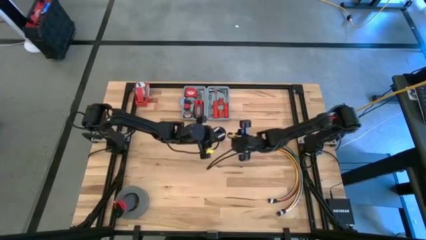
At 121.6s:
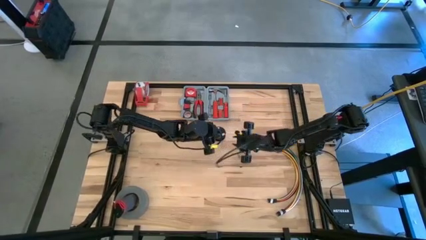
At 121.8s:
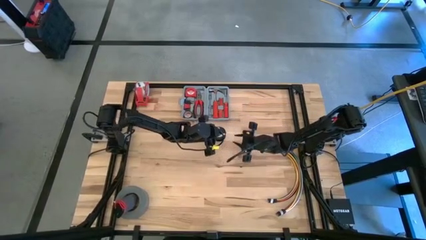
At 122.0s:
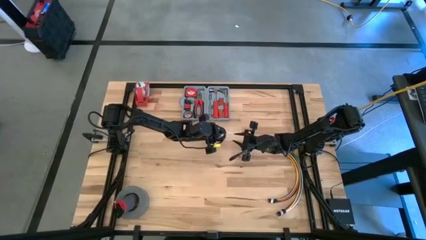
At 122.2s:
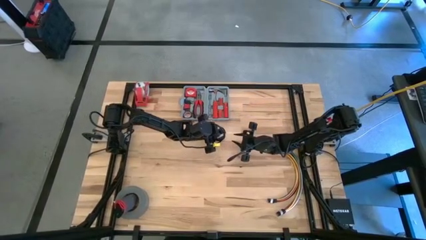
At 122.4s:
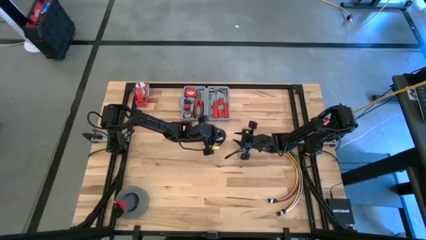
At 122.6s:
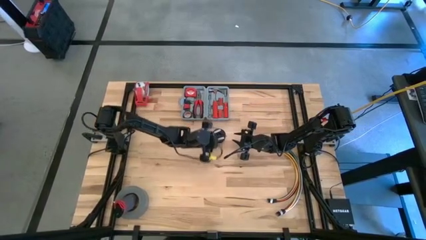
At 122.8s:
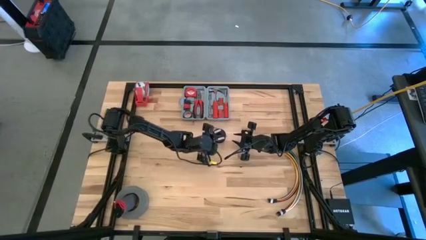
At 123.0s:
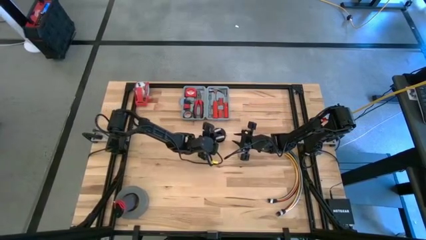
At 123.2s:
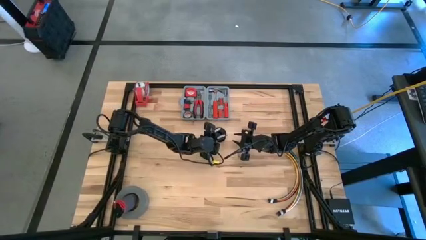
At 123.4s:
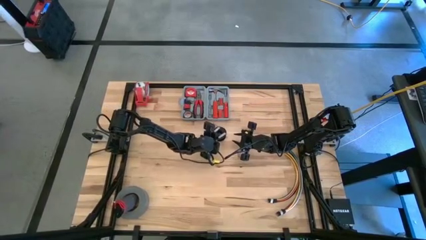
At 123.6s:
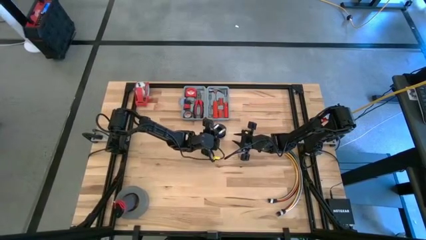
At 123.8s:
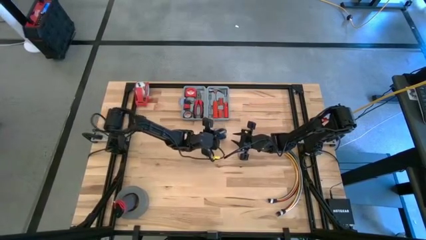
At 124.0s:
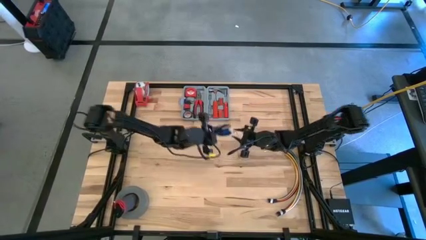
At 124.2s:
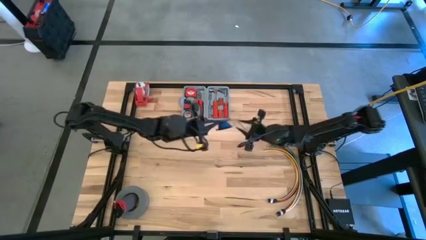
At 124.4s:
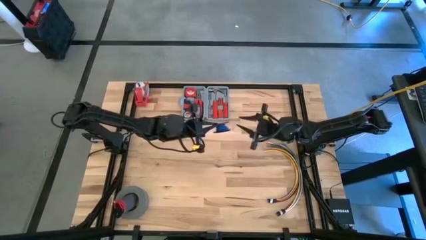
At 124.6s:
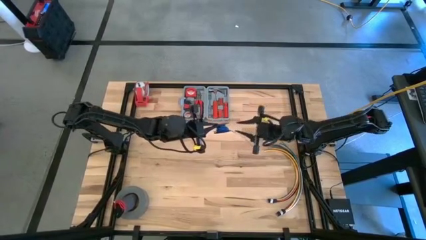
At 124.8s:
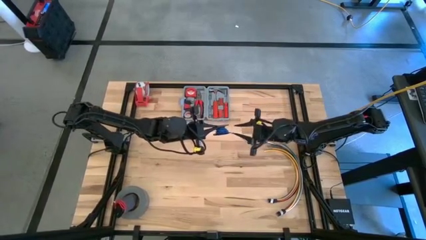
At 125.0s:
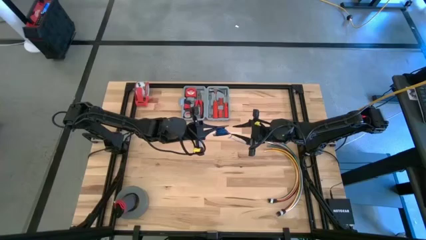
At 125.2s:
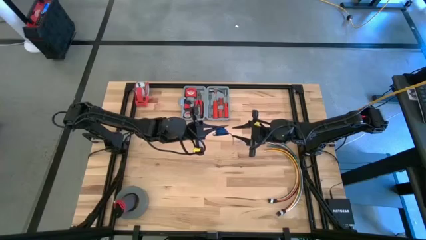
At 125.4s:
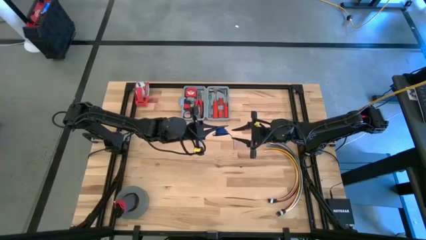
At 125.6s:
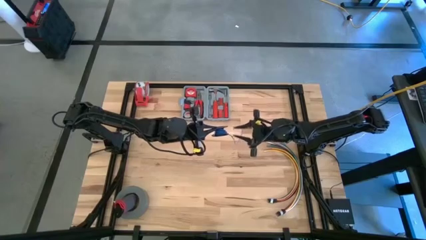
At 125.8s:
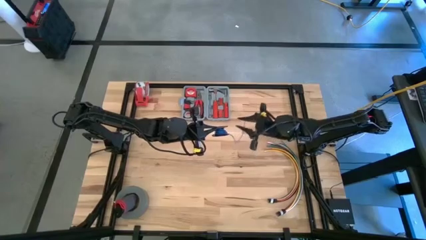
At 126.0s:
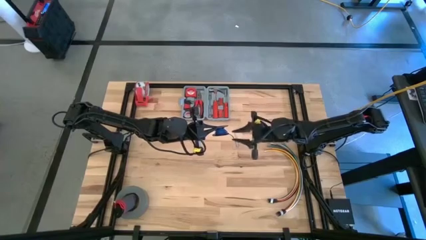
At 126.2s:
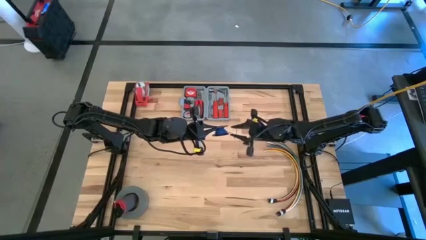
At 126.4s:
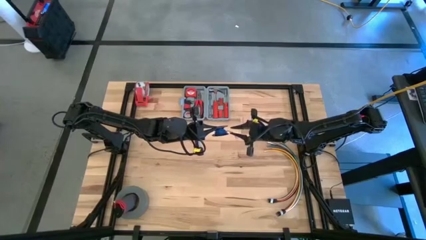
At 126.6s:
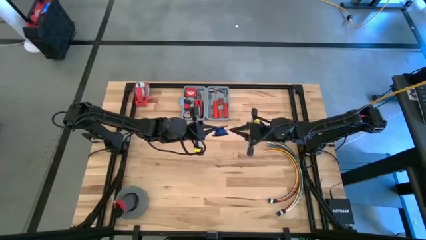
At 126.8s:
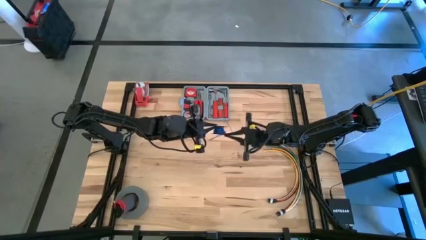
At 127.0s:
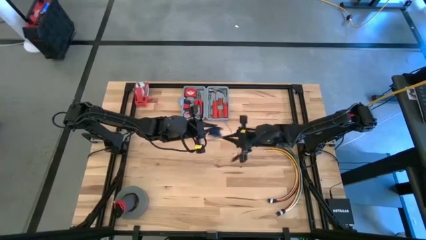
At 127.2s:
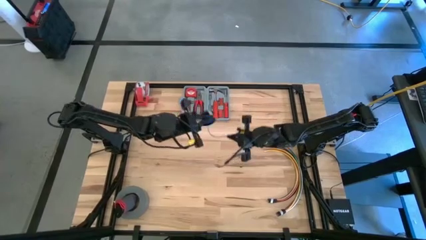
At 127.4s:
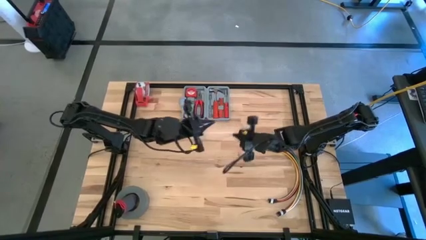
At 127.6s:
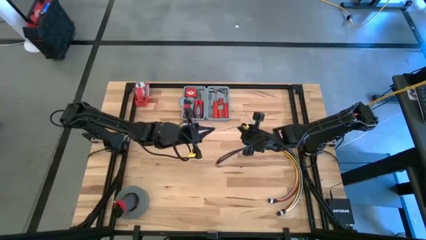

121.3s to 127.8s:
Task: Coil cords
Uncoil the blue wire from the spool

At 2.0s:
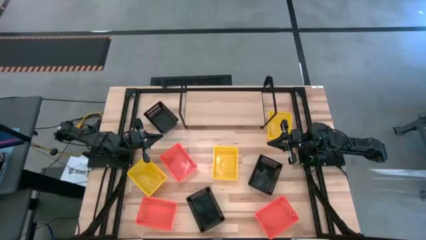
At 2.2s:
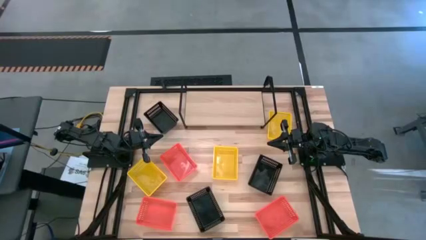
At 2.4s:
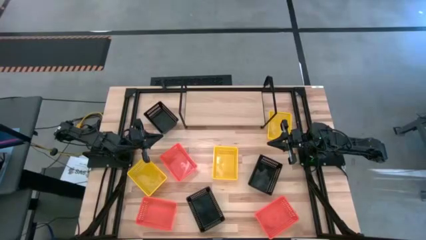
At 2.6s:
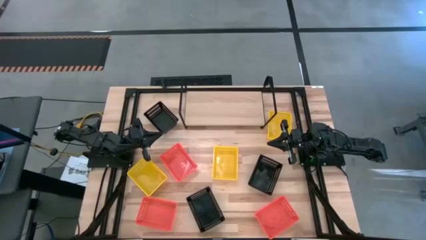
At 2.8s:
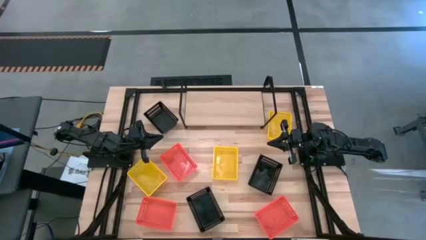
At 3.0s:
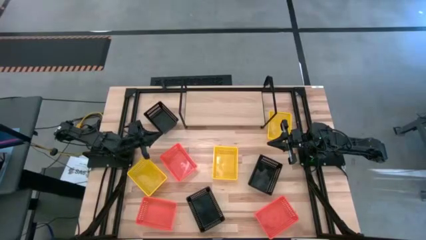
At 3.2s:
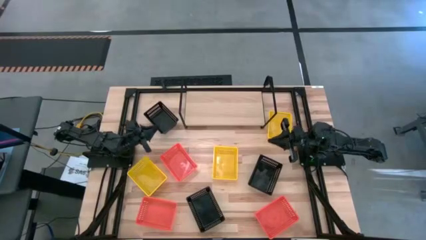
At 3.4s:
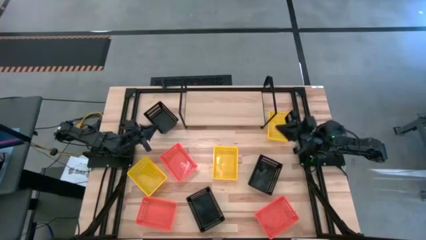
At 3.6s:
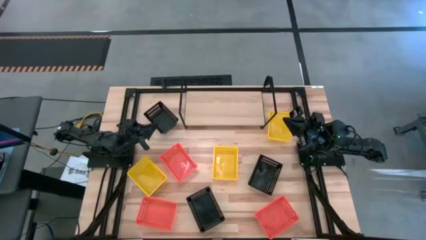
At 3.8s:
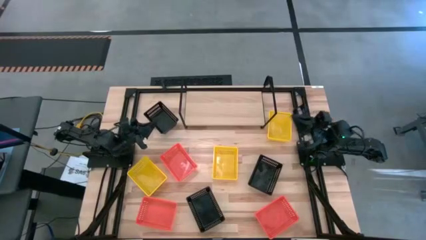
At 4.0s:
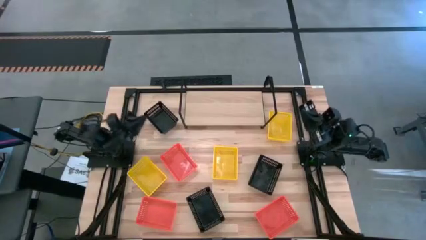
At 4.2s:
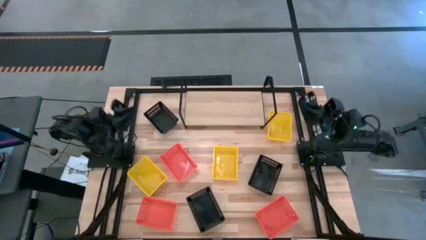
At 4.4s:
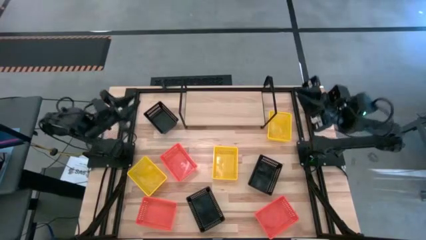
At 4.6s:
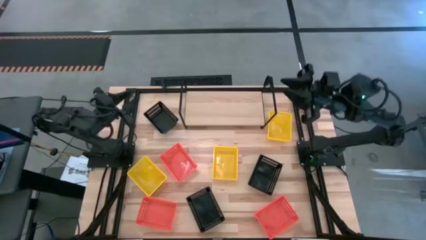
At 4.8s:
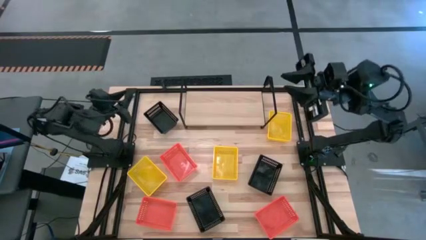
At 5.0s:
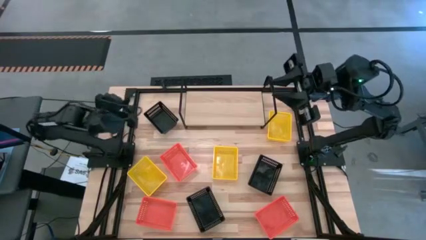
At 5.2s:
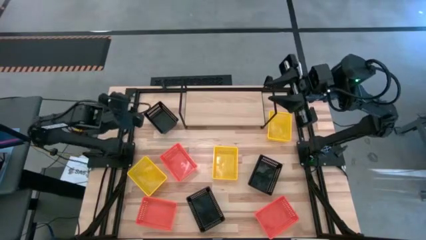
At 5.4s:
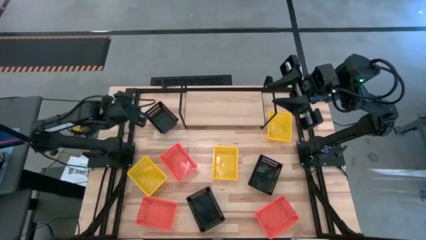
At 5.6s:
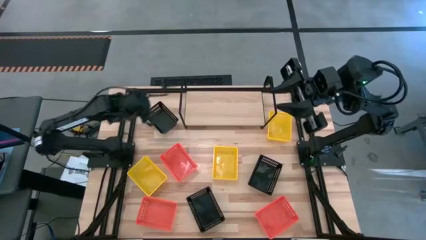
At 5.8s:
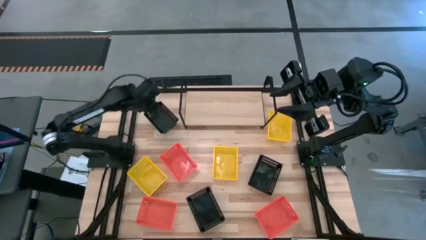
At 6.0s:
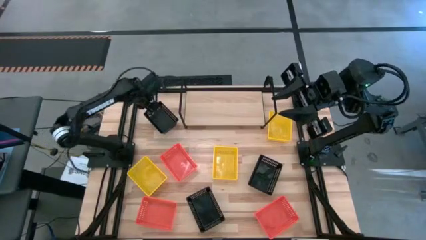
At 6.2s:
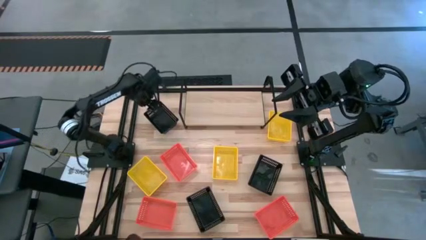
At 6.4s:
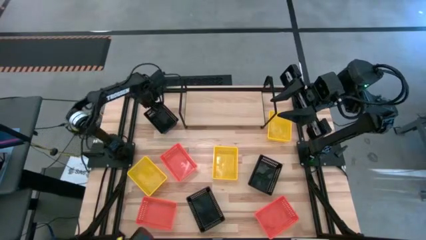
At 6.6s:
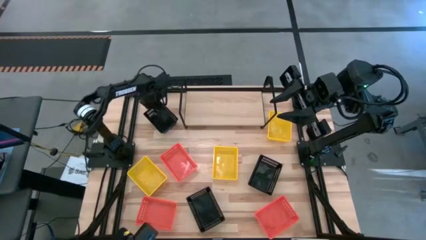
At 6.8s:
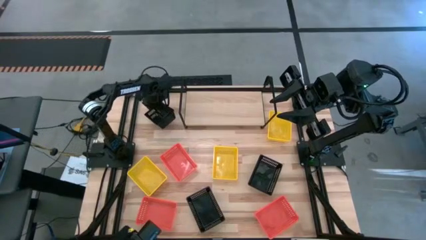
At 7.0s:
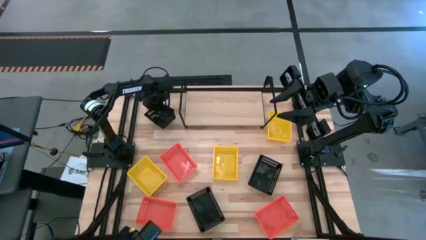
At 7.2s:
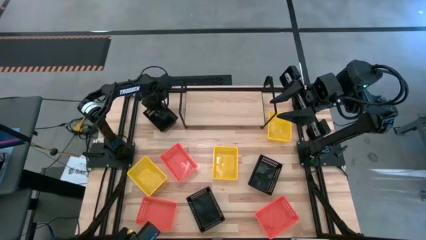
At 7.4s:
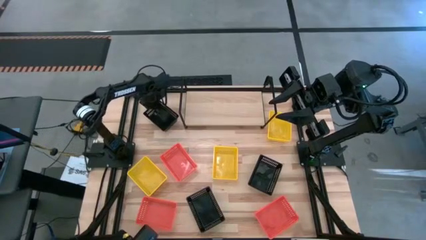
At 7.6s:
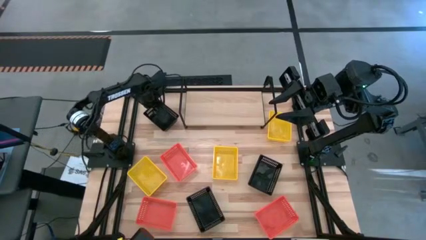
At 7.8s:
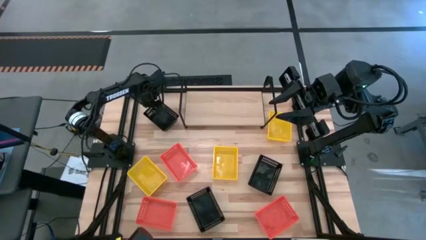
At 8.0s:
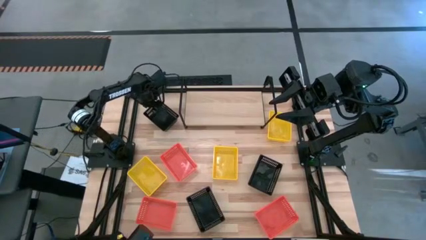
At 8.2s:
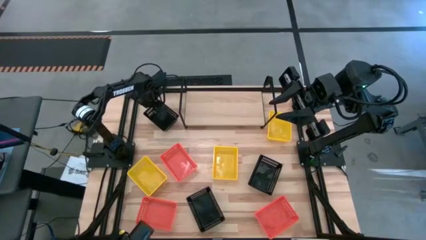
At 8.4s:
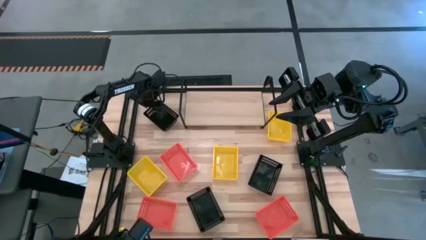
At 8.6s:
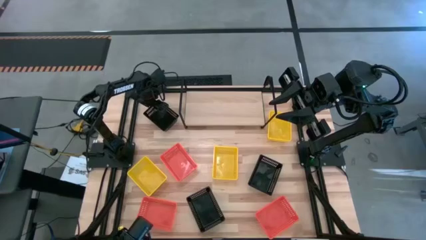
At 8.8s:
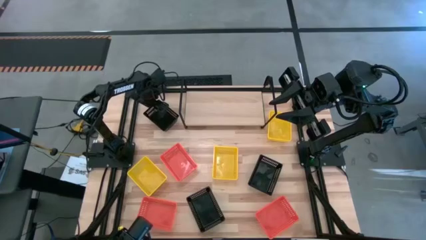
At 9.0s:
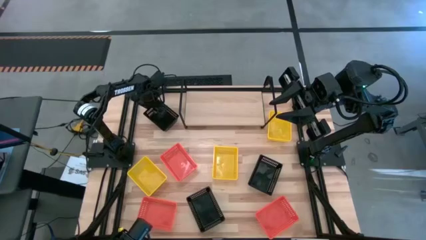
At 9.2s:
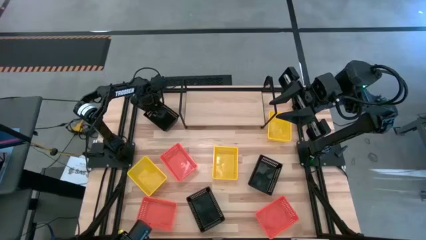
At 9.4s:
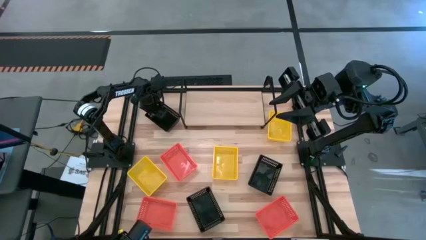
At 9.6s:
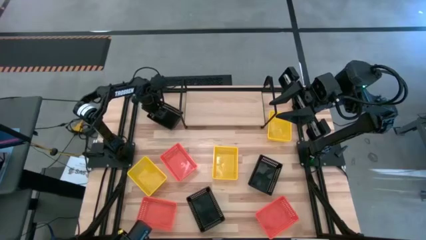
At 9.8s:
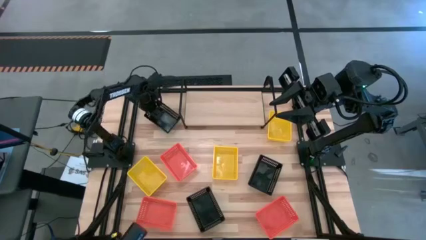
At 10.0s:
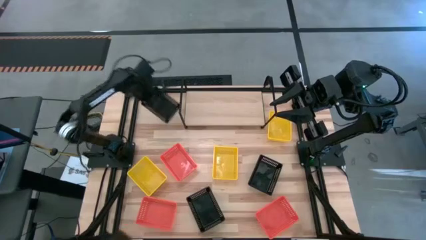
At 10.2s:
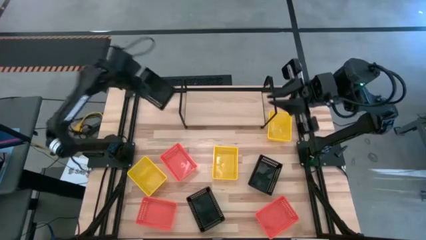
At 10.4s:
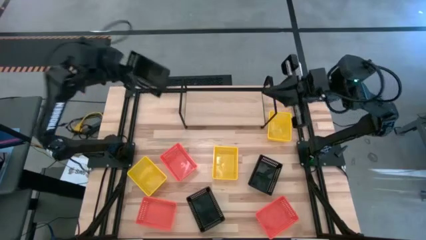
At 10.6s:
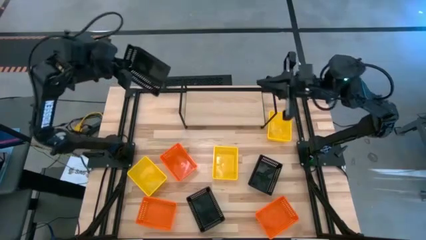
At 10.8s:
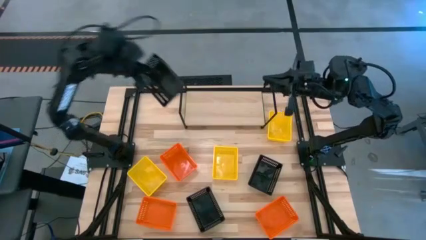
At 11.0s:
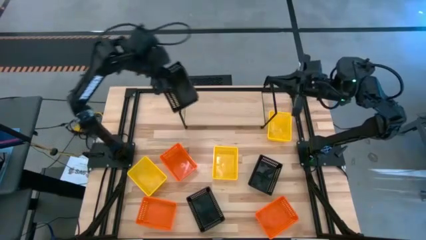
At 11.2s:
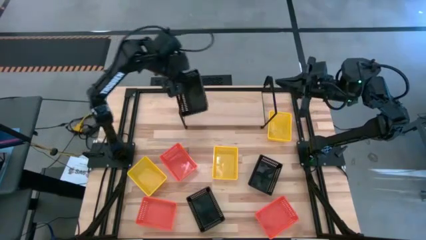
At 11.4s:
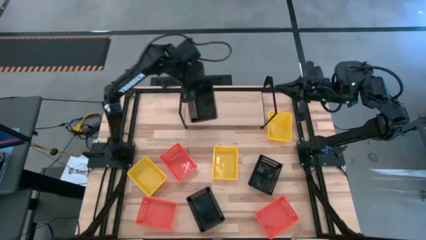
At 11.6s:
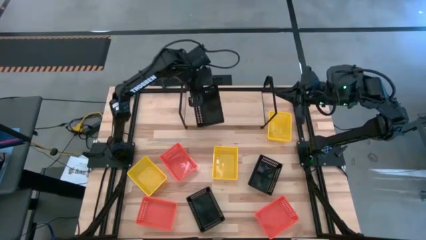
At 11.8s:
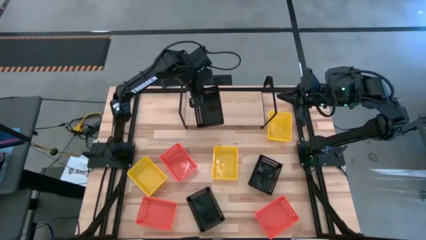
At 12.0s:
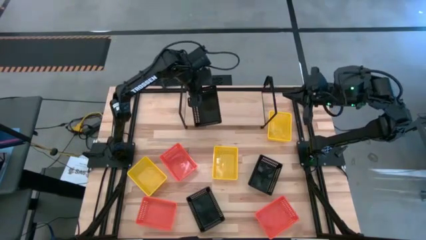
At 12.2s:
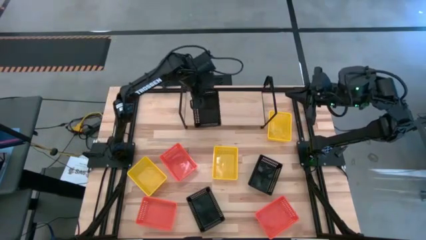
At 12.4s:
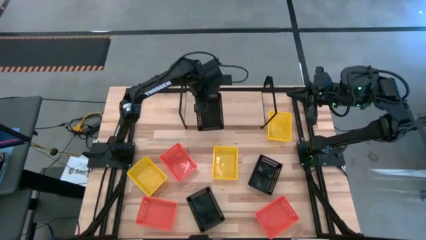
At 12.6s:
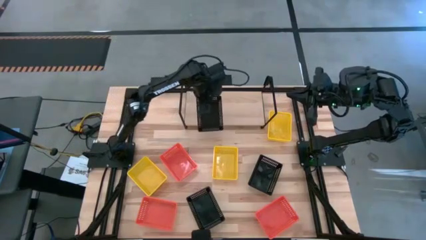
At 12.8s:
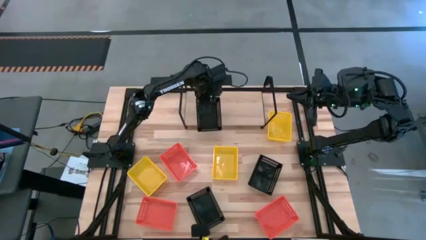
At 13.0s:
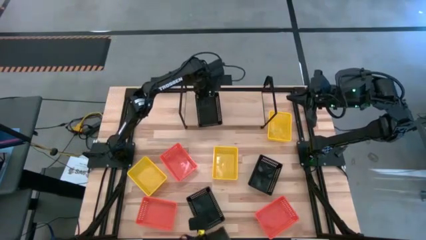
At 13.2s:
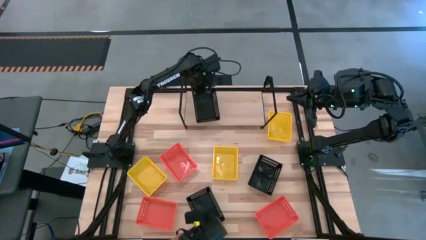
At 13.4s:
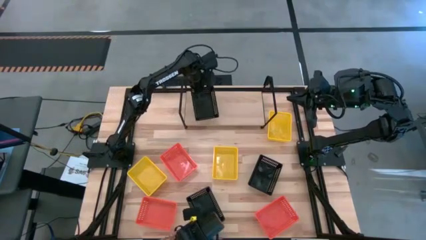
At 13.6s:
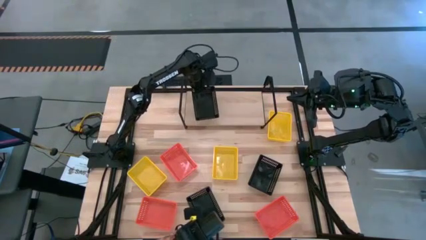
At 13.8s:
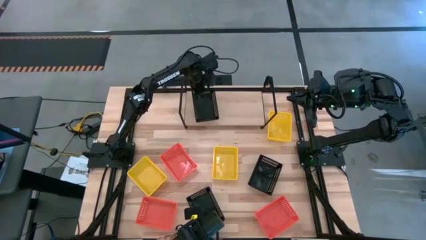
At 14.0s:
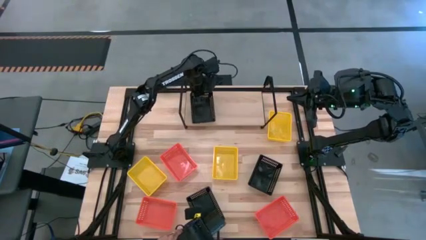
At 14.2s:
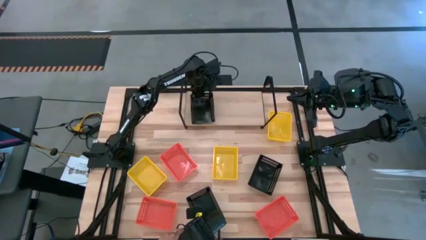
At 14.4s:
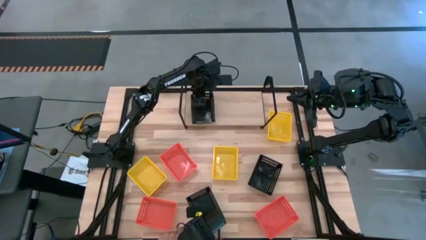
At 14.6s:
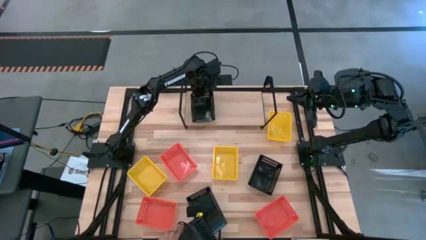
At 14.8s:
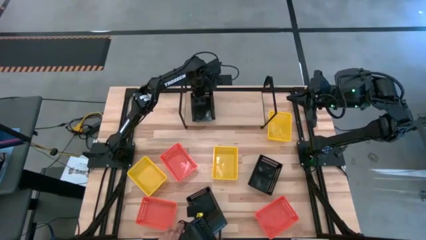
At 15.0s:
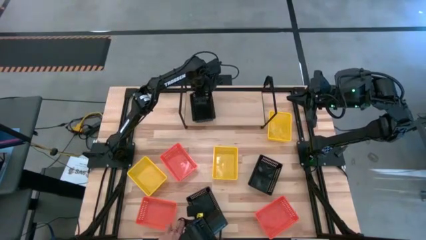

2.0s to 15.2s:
Task: Stack baskets on shelf by color
Put the top black bin on the shelf
